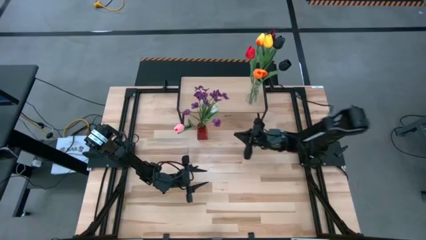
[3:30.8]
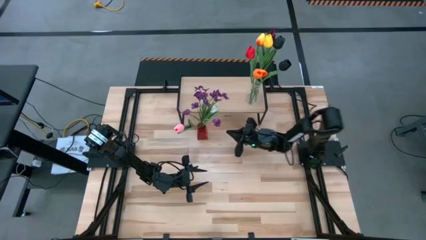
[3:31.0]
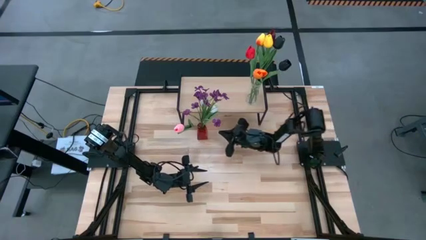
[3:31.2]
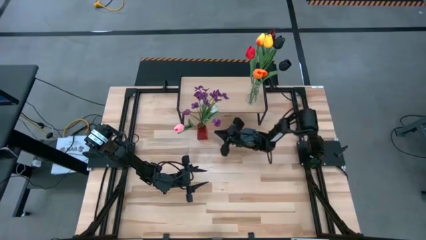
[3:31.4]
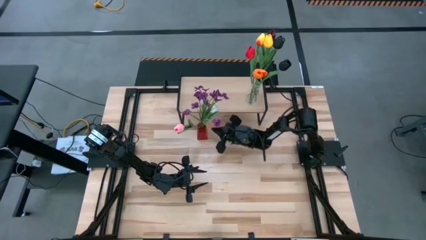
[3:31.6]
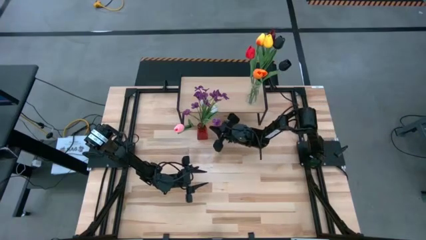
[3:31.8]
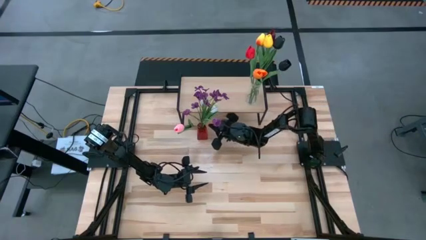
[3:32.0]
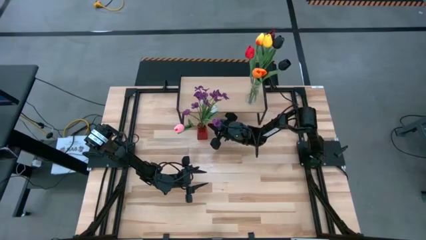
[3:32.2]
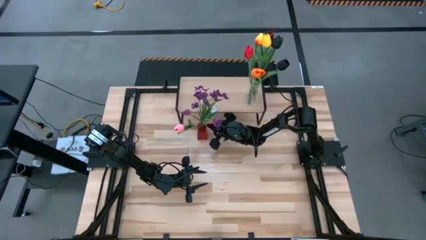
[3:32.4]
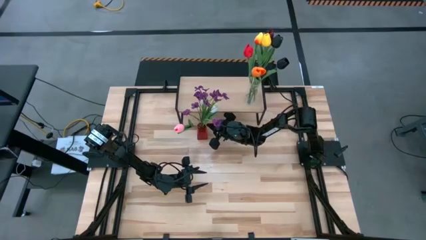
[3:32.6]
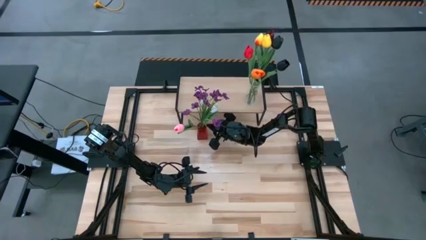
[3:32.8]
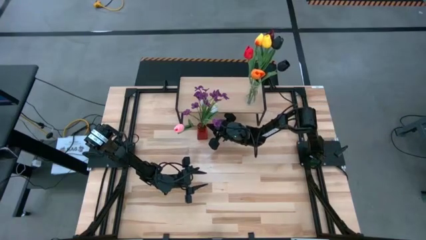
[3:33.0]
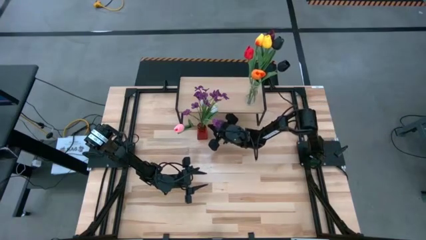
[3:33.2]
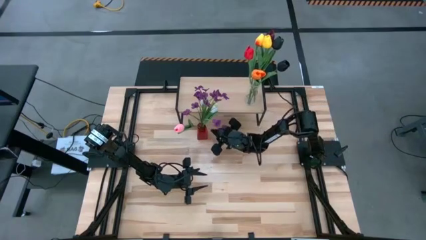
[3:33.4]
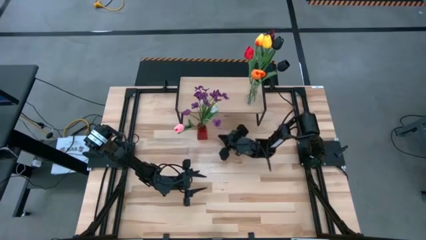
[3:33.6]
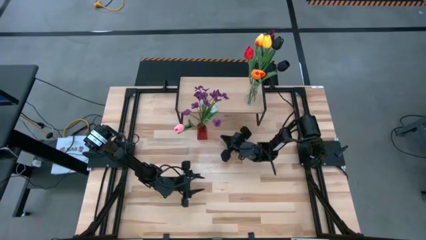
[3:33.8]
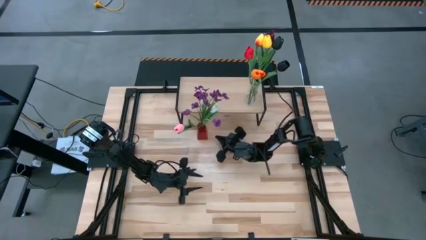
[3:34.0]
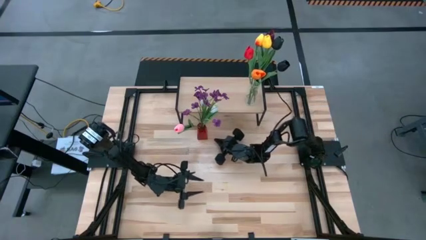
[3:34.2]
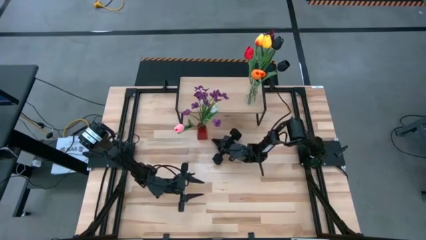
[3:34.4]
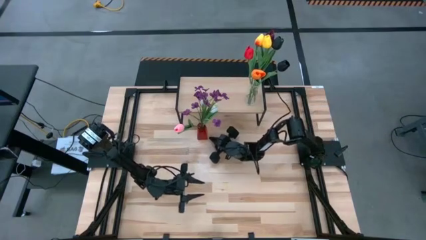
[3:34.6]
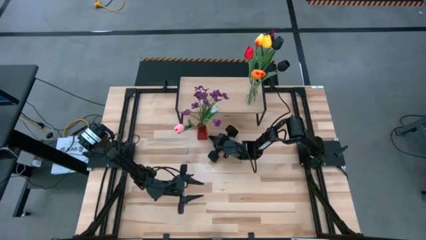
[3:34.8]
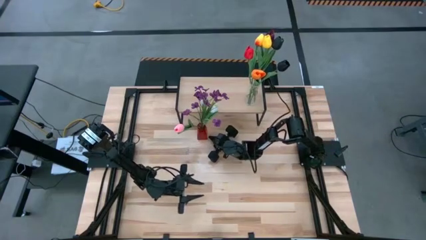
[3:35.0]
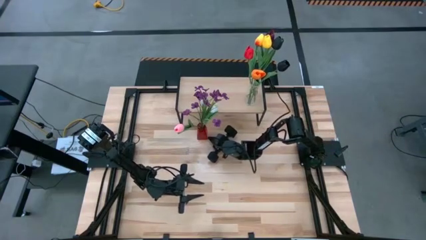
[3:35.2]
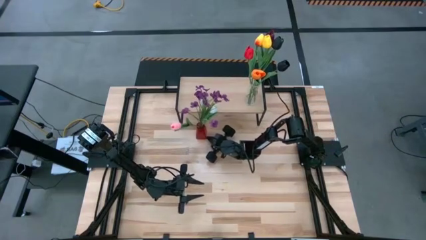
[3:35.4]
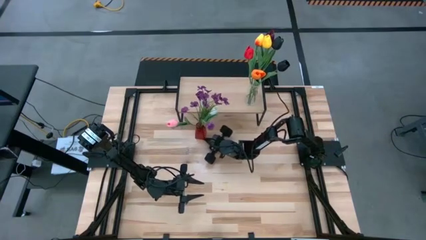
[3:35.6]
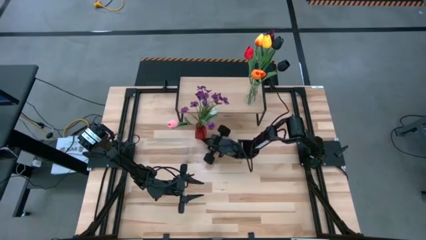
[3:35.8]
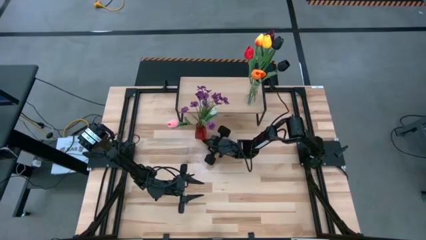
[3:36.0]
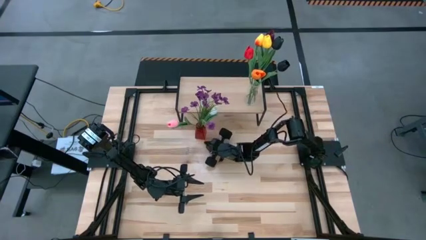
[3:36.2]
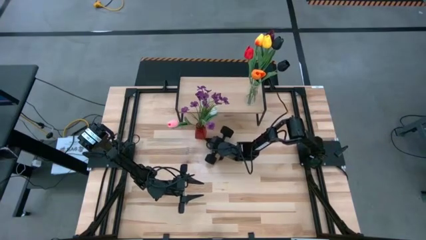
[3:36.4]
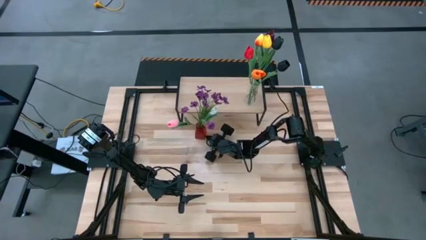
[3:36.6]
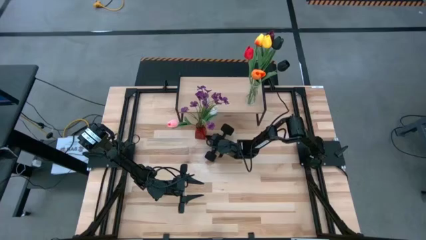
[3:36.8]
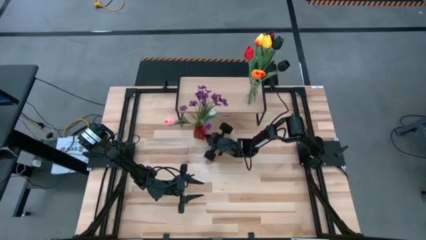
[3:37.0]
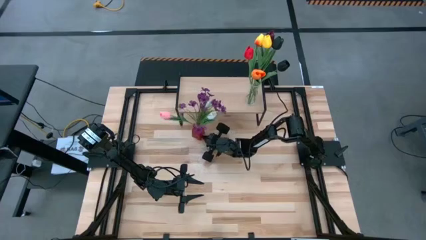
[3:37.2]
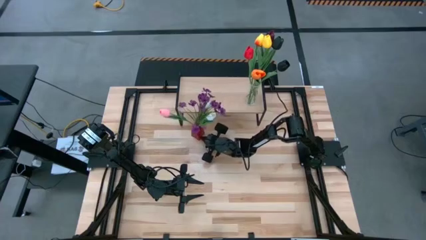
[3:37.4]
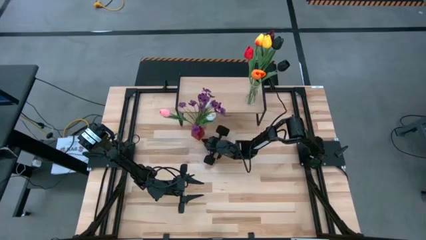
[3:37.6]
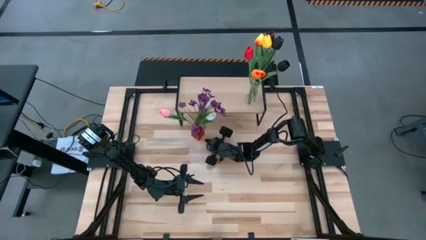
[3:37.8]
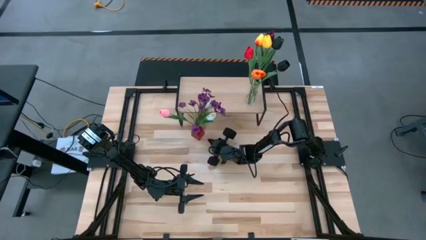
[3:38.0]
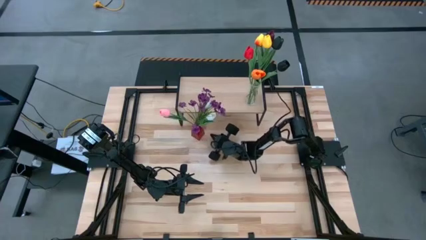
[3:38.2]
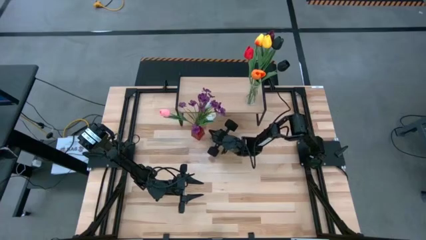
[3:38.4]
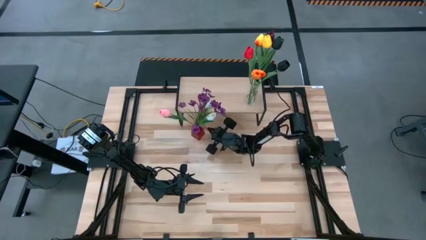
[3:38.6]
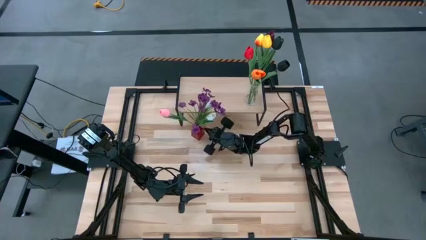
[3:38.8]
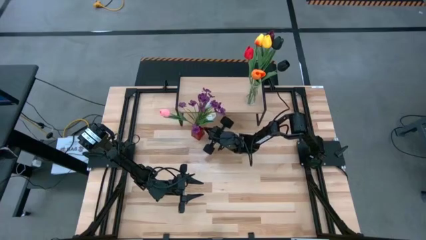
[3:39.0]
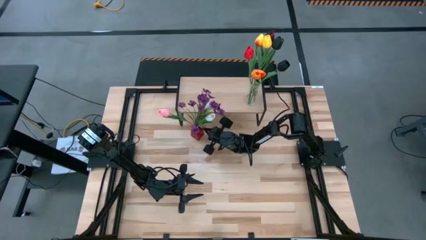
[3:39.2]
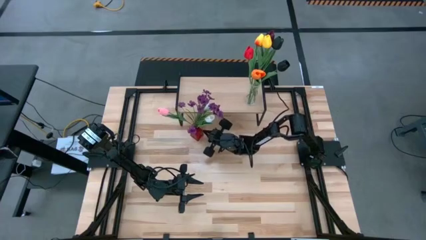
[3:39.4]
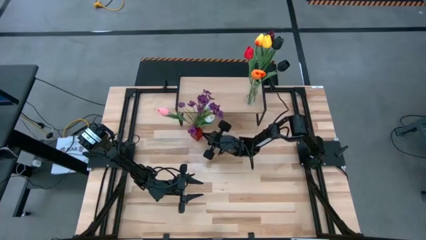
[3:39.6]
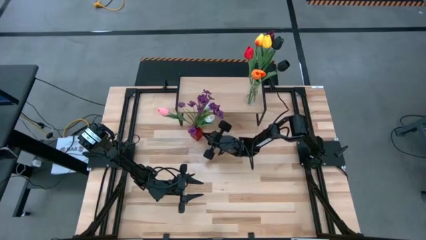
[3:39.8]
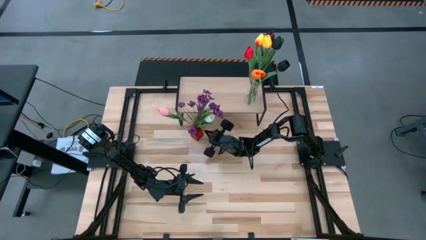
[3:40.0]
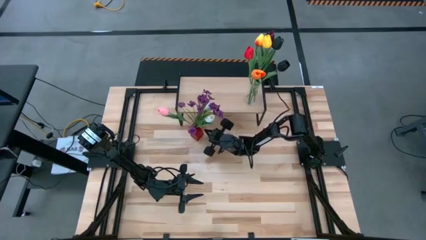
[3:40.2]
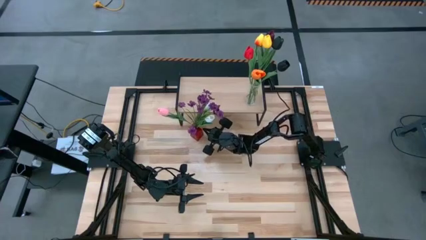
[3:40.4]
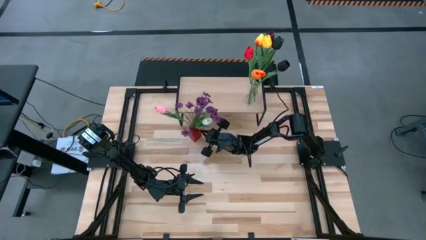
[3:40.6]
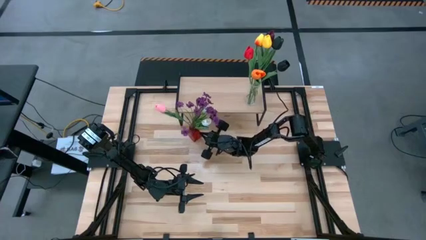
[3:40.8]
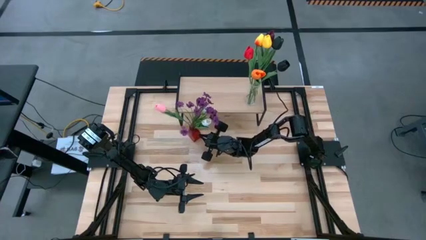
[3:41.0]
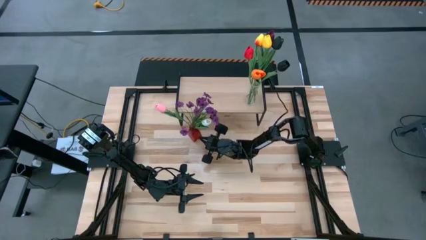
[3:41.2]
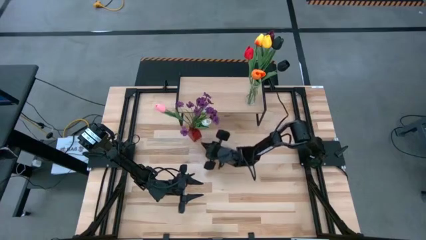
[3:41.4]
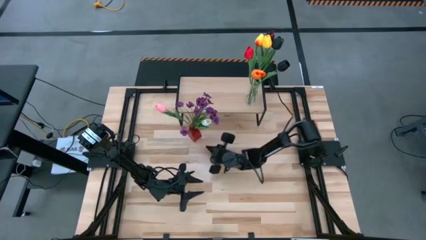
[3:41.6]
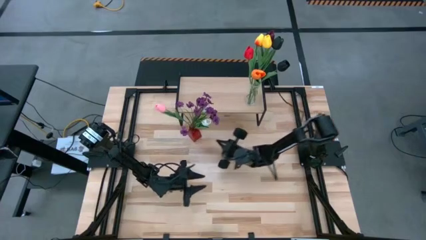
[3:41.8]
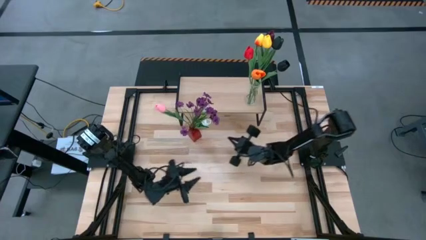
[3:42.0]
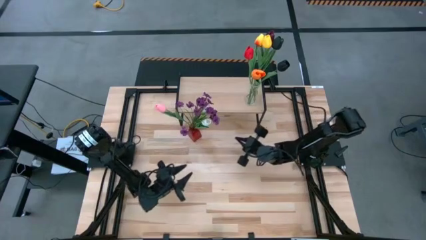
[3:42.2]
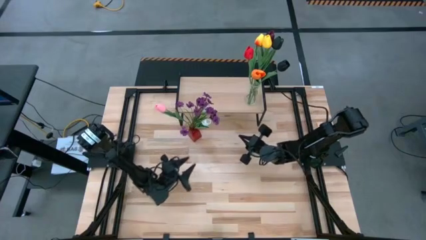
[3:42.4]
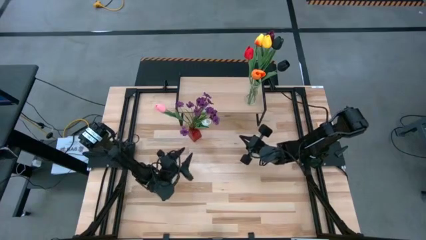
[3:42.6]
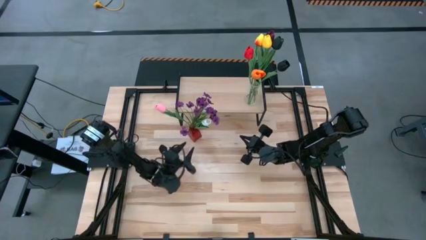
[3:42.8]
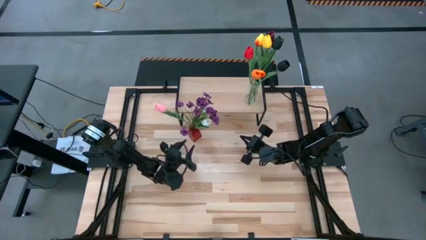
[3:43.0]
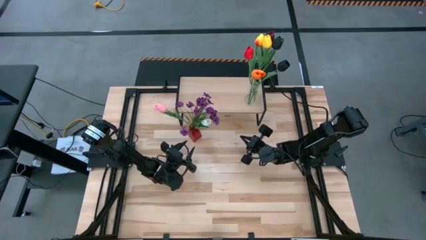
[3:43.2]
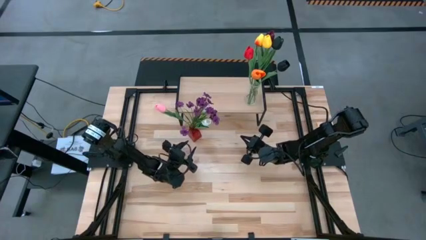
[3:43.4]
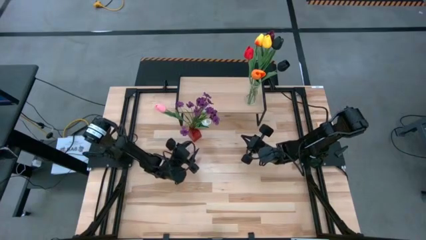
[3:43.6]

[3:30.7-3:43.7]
Task: Pick and place flowers into a vace then onto a shelf
Put the red vase with flowers on the shelf
